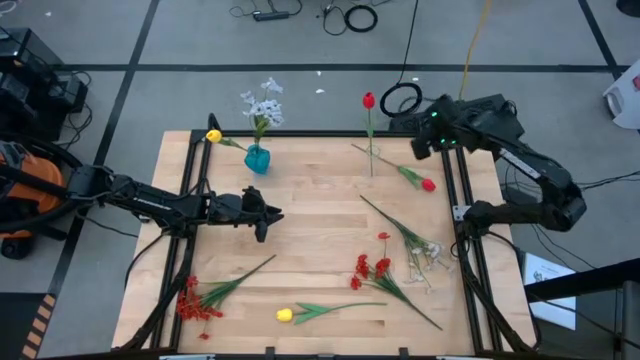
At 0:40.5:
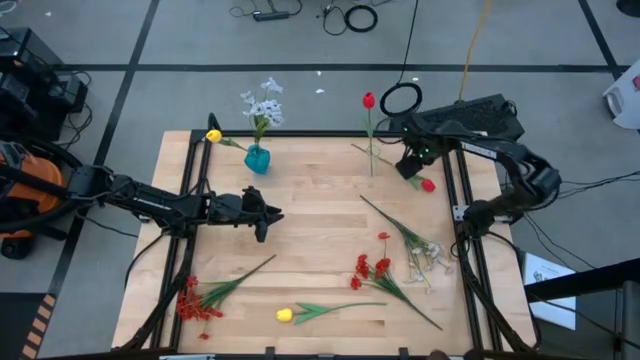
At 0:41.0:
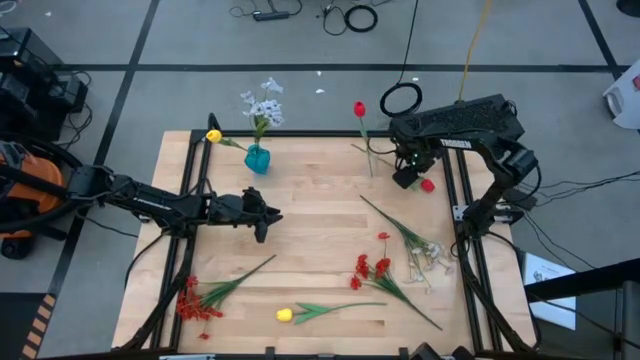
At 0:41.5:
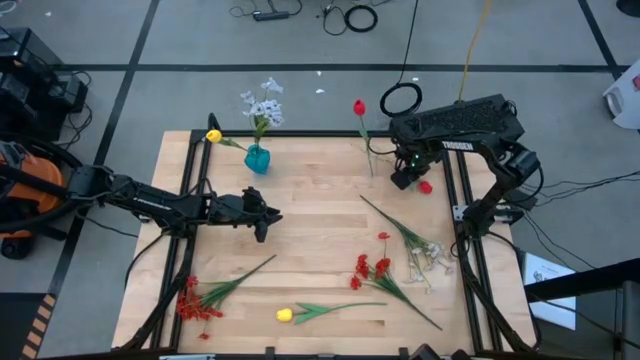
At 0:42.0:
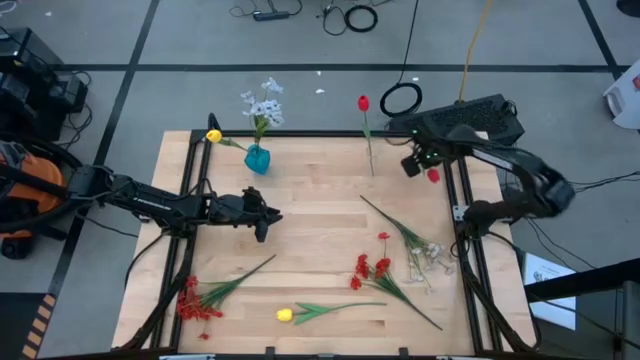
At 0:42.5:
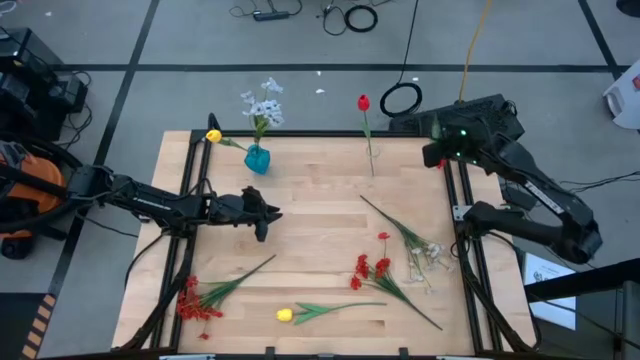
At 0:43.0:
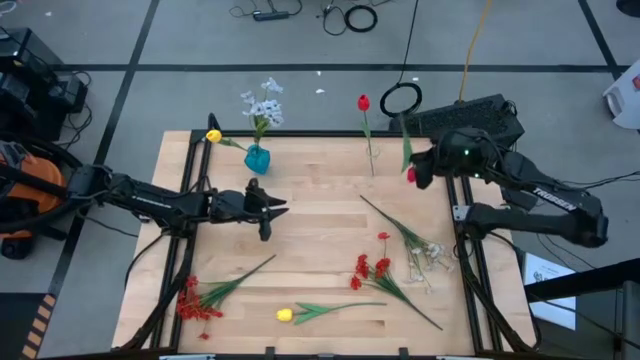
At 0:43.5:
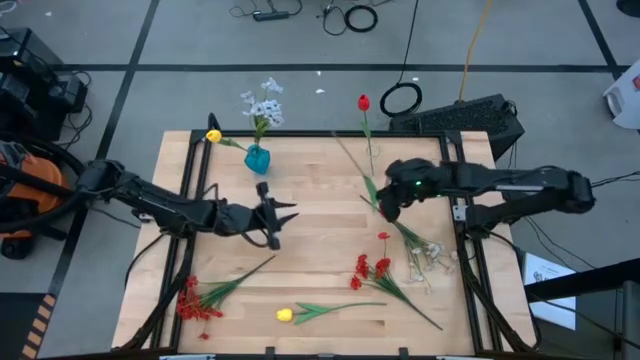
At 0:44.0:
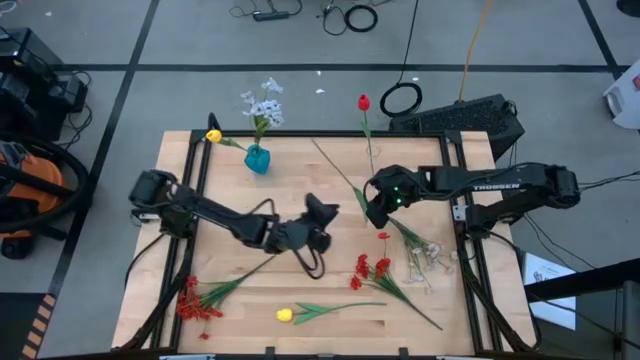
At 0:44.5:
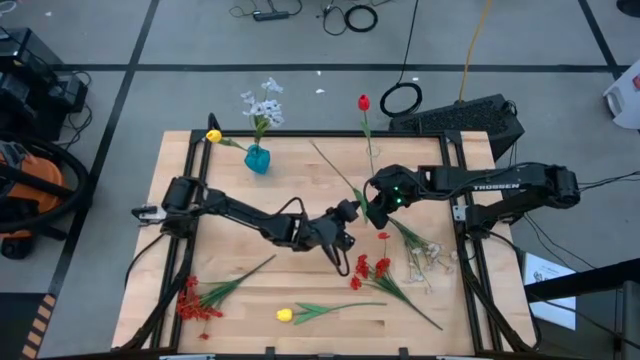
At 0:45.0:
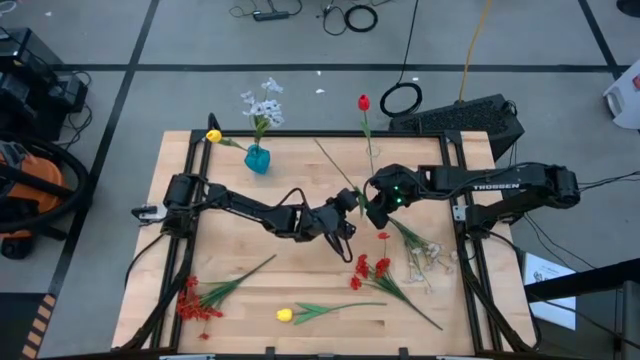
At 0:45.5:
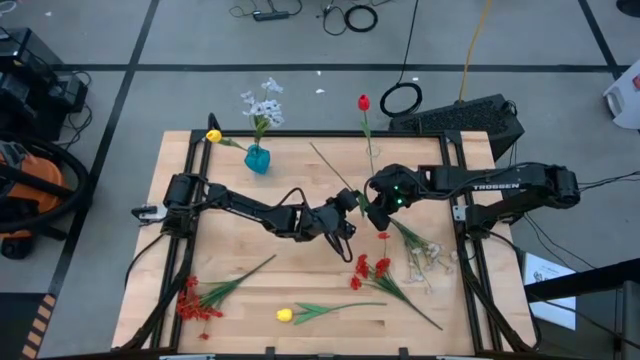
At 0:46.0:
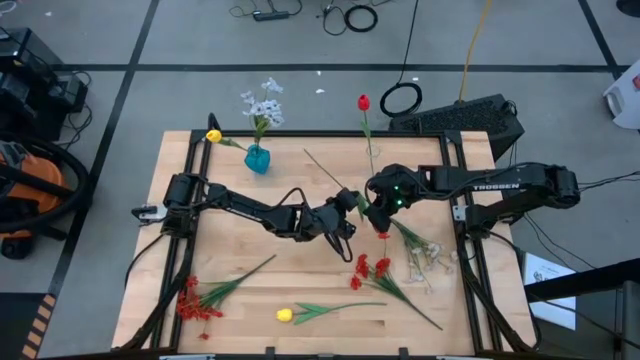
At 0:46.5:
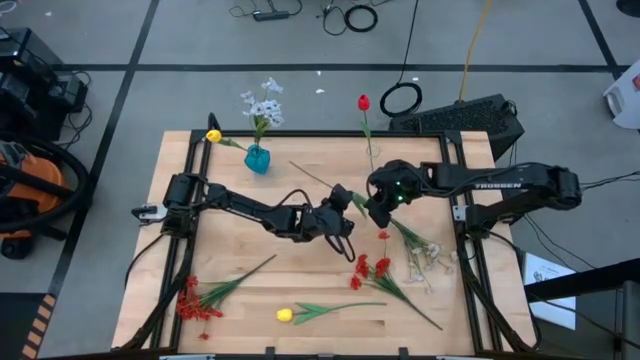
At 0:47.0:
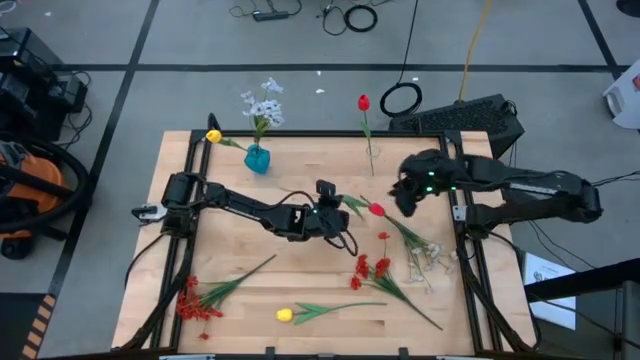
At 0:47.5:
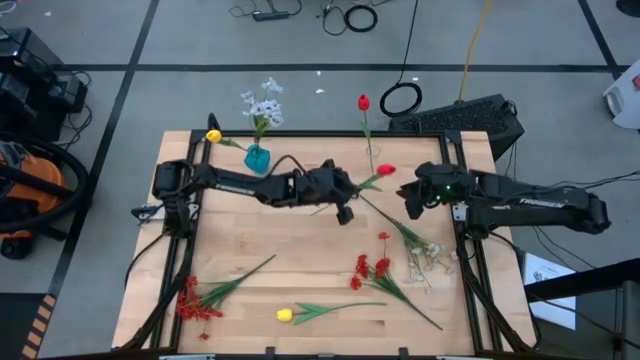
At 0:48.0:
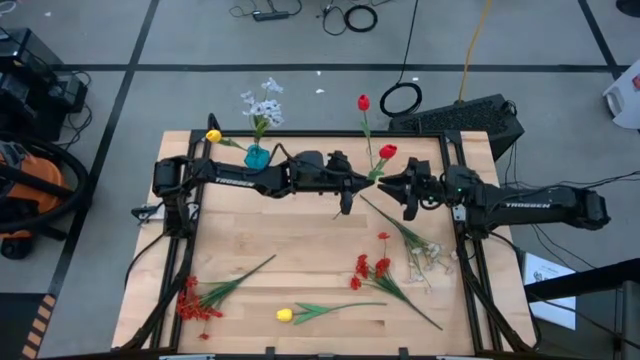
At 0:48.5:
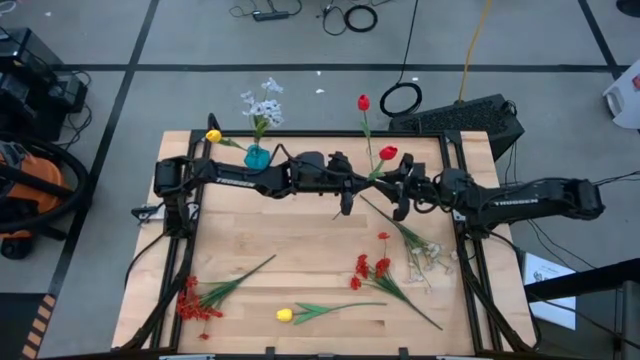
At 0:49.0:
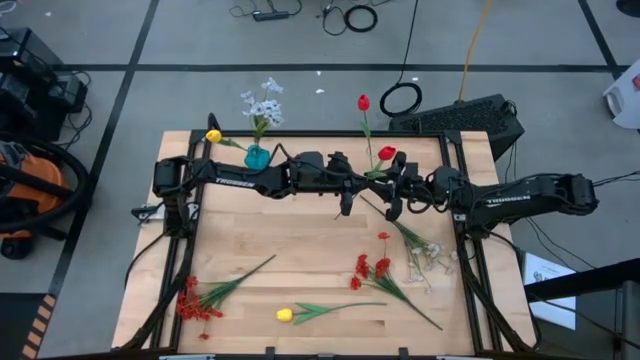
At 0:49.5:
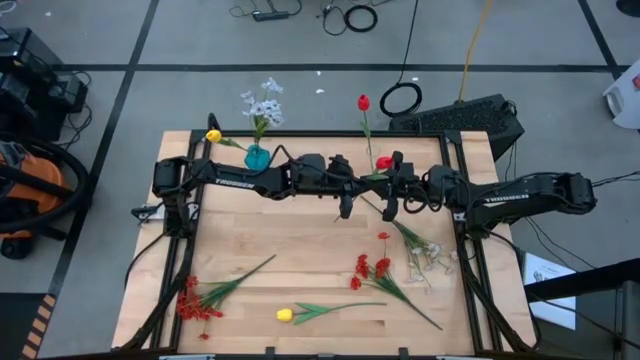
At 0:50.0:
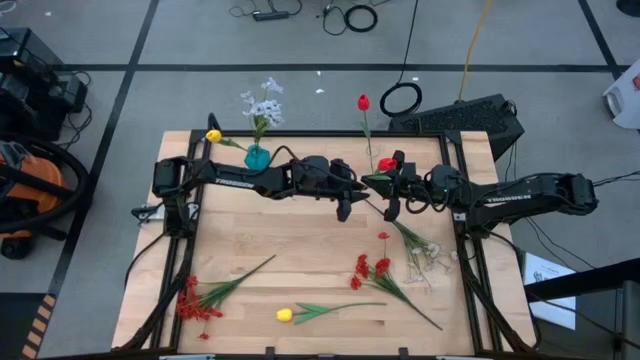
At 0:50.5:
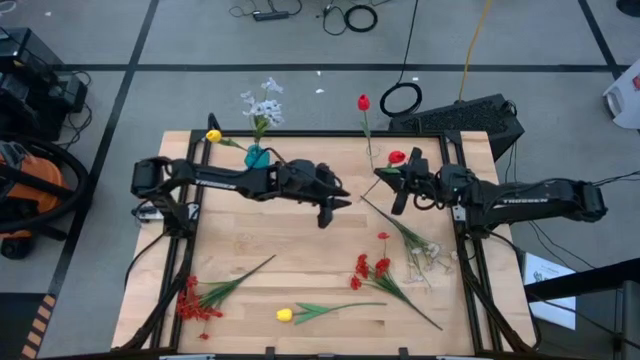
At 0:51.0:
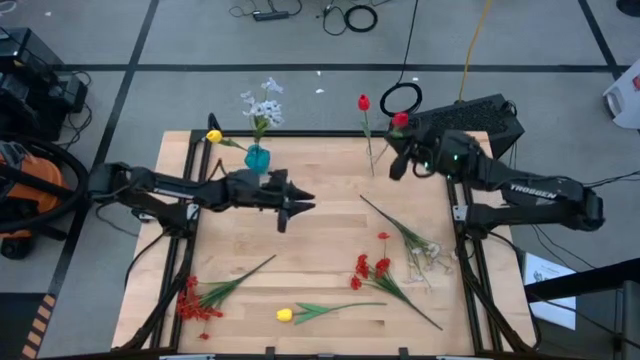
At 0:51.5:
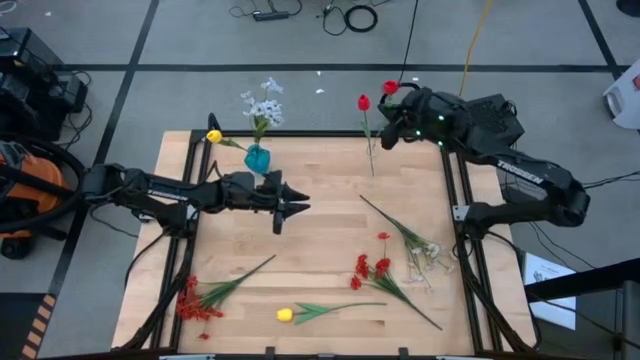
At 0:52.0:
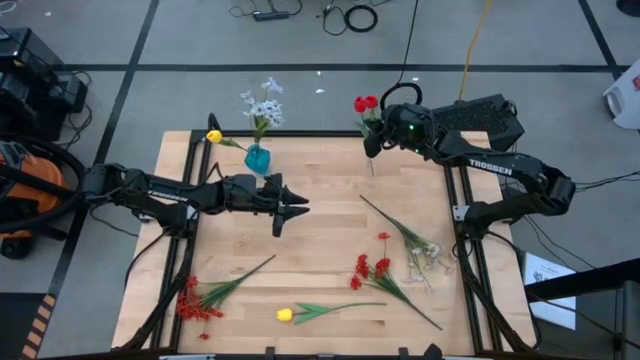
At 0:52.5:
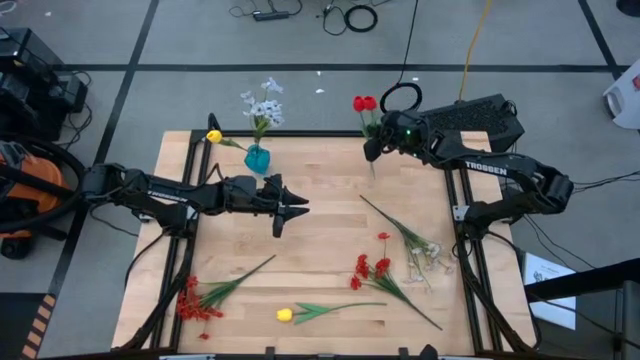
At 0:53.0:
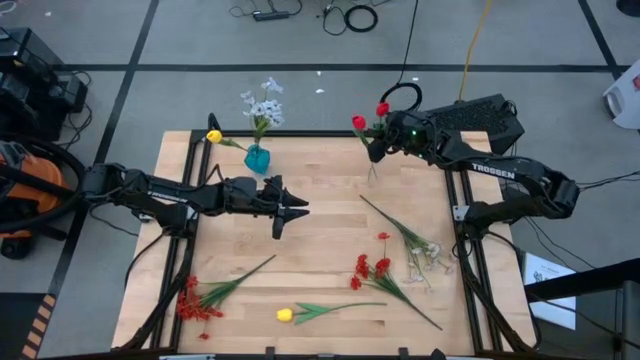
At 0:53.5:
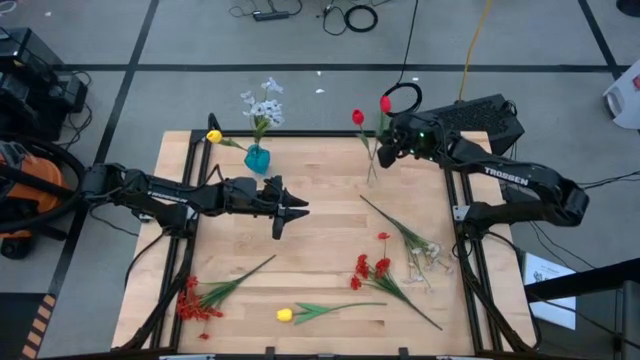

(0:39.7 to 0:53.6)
Task: Sort flowers into vase by color
Put the red flower into the transparent vase

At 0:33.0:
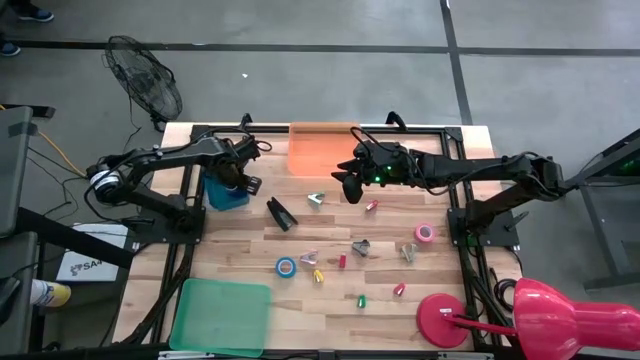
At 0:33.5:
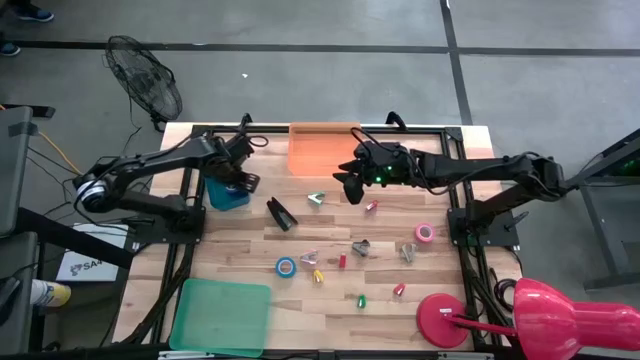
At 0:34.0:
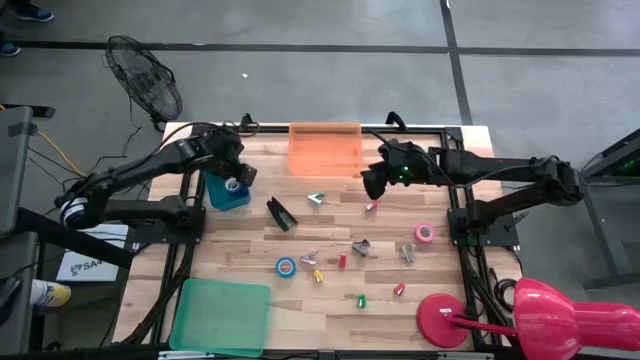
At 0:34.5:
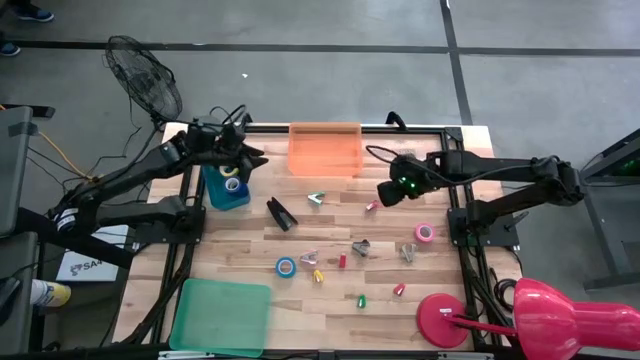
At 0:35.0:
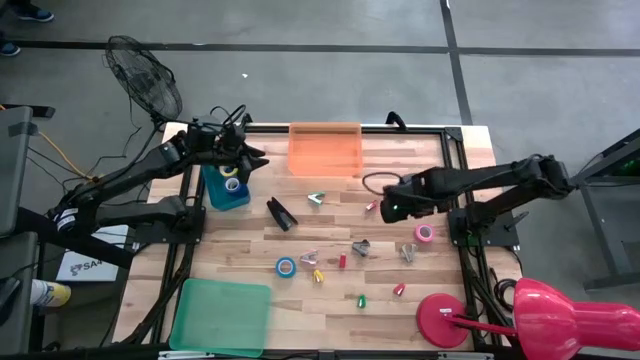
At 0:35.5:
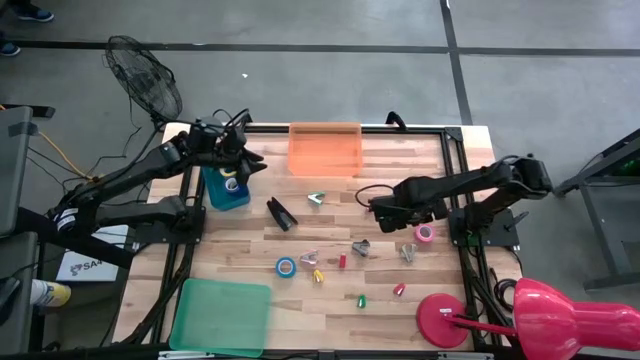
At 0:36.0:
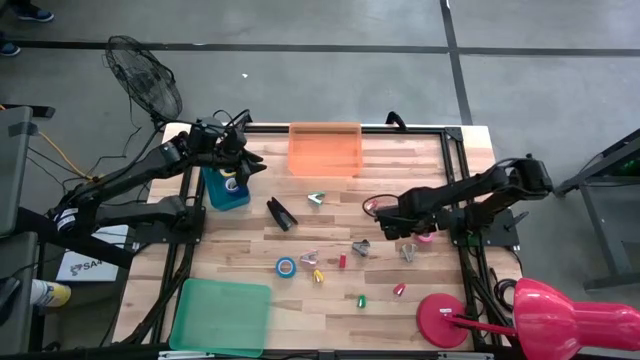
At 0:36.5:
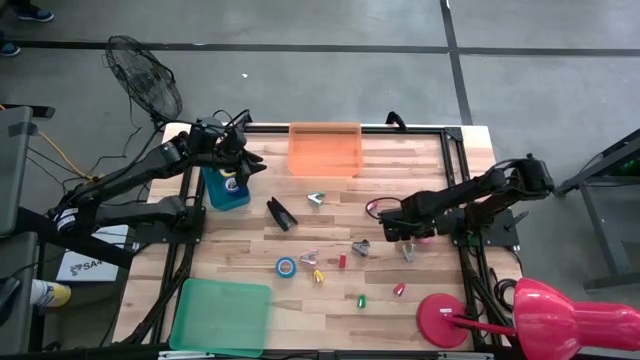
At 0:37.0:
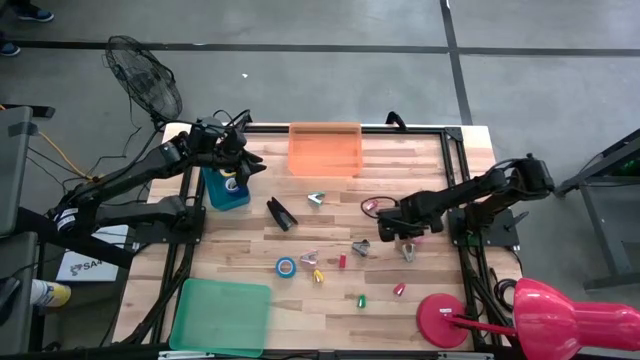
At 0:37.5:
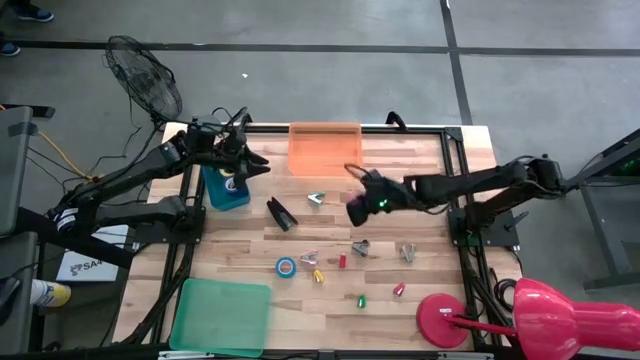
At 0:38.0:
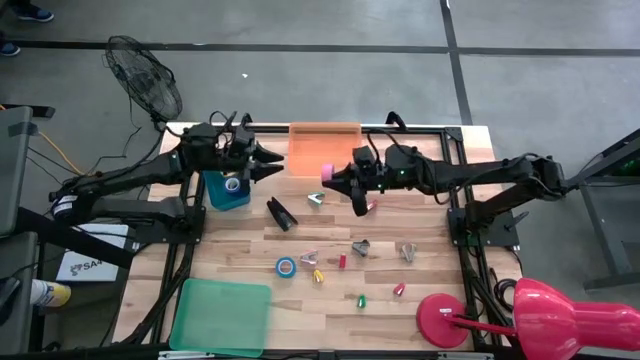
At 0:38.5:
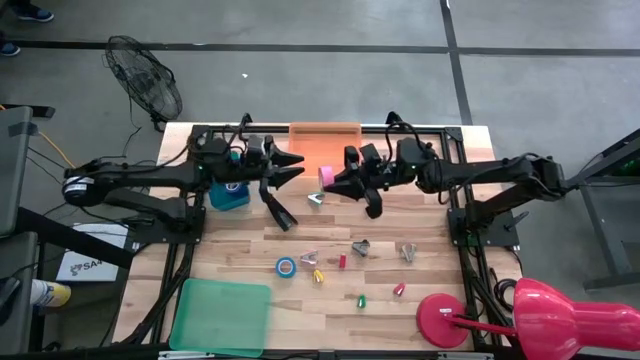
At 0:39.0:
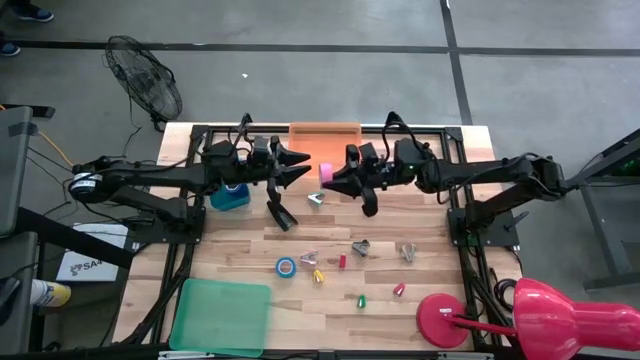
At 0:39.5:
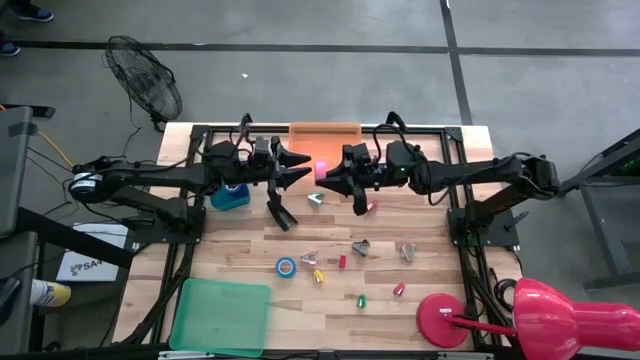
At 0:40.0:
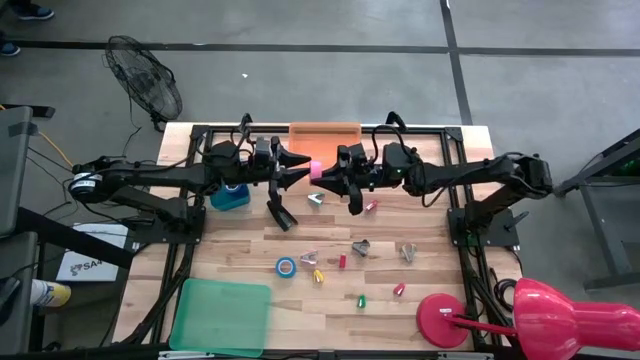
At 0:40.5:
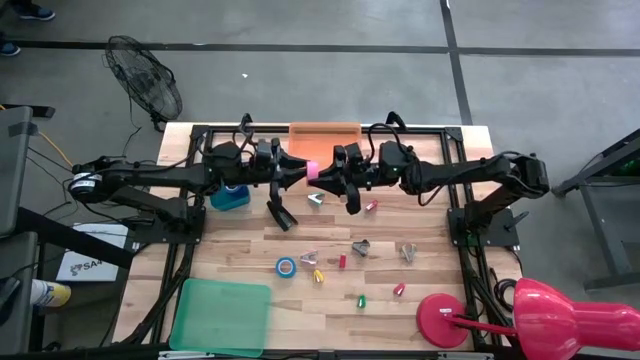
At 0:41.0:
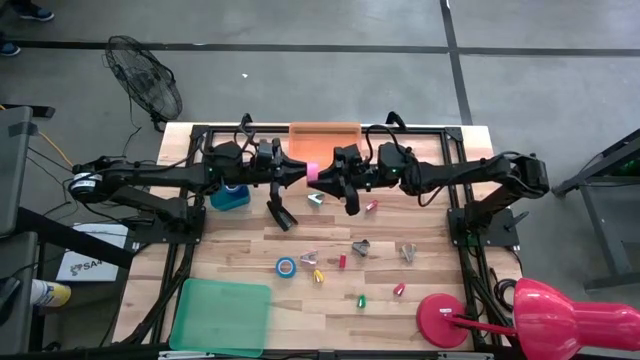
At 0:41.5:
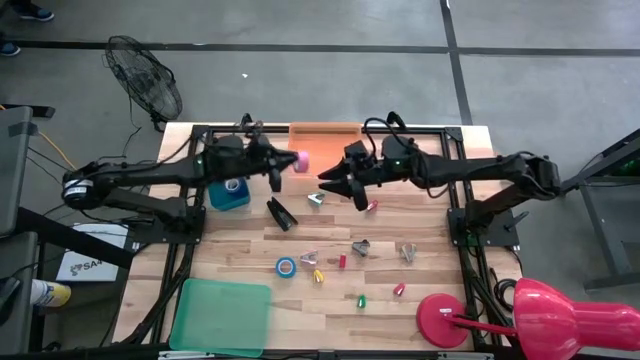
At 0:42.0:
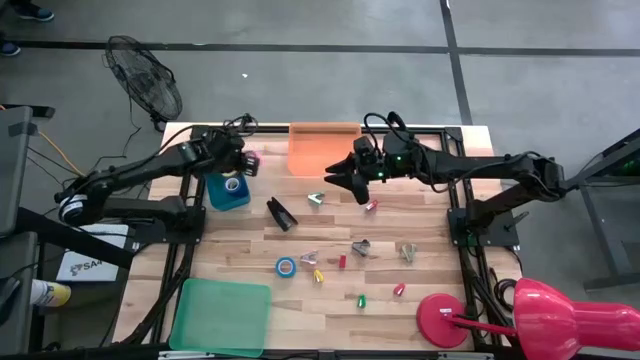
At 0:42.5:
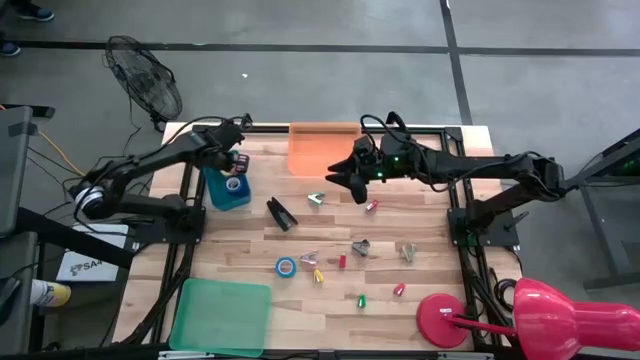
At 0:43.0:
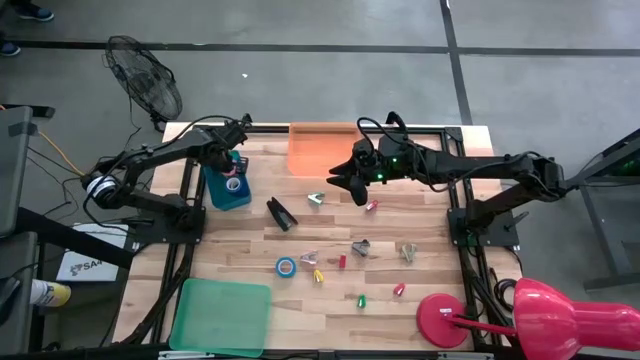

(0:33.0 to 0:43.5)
Task: Pick and place Stapler, Stapler remover, tape
Put the pink tape into the blue bin
